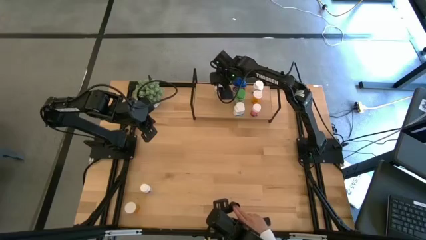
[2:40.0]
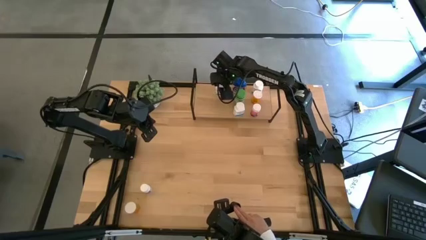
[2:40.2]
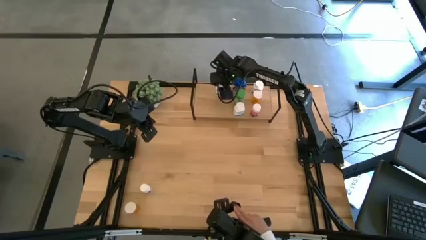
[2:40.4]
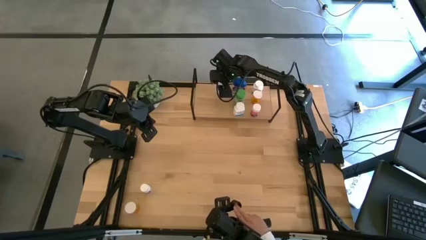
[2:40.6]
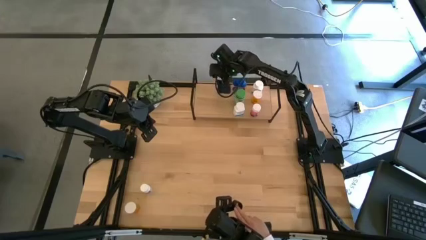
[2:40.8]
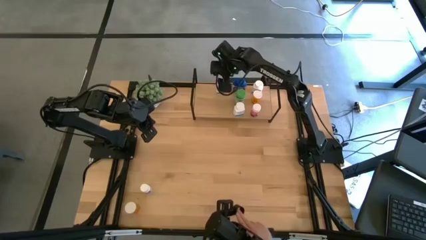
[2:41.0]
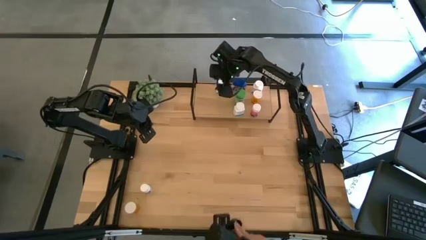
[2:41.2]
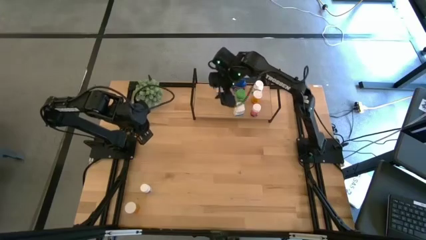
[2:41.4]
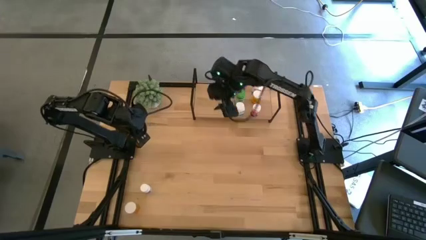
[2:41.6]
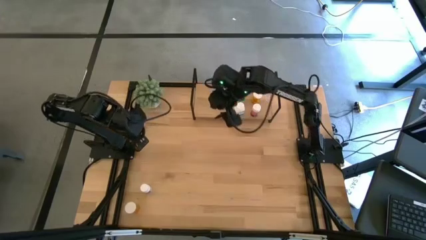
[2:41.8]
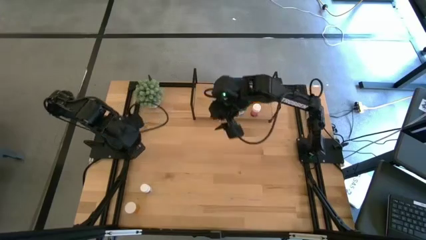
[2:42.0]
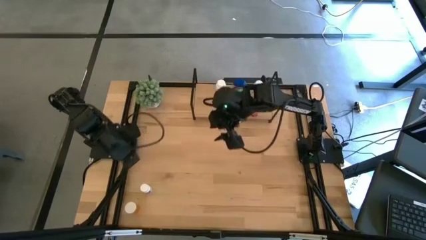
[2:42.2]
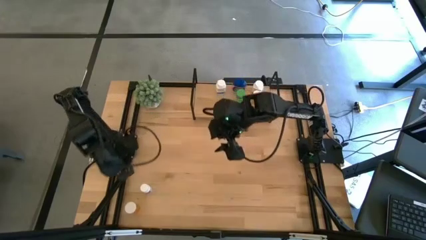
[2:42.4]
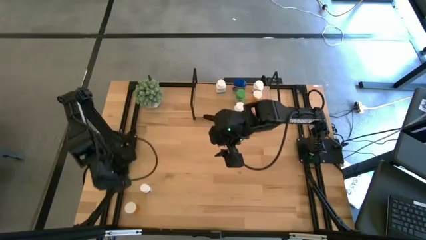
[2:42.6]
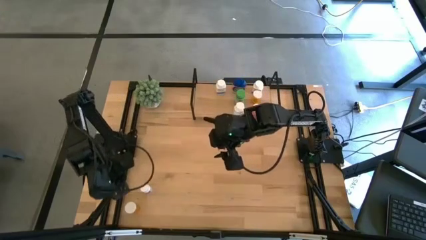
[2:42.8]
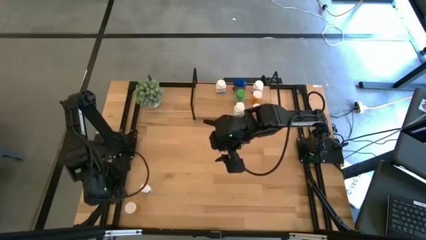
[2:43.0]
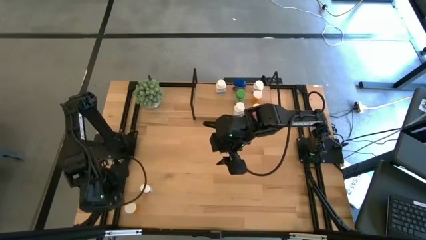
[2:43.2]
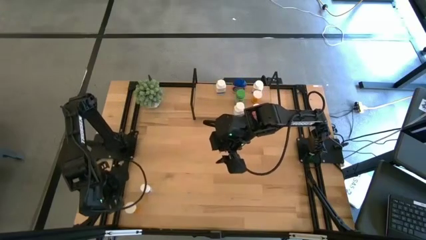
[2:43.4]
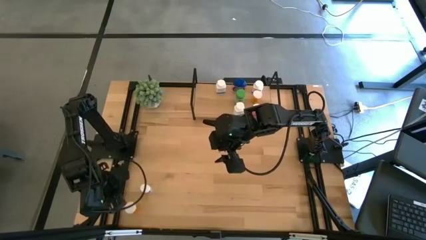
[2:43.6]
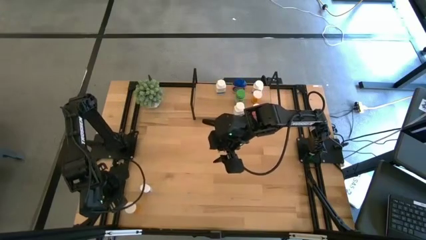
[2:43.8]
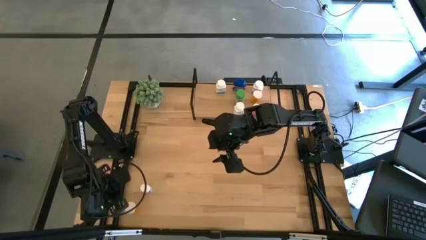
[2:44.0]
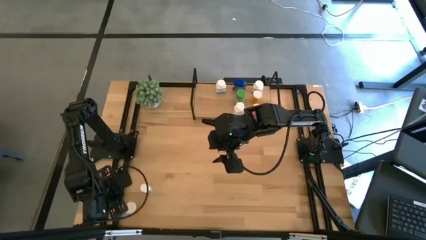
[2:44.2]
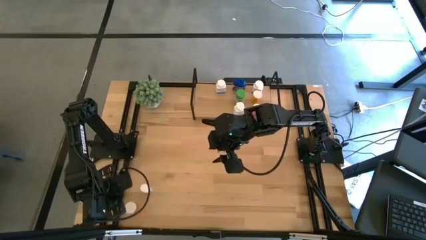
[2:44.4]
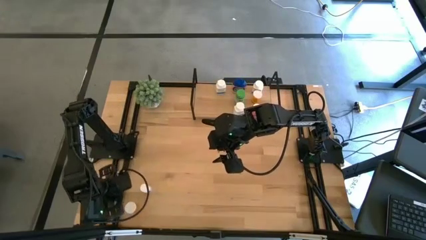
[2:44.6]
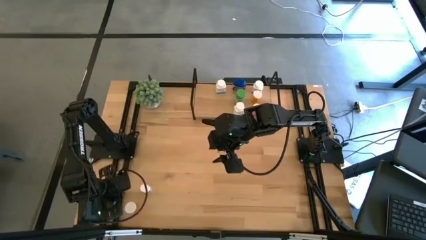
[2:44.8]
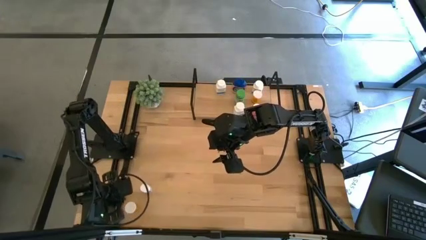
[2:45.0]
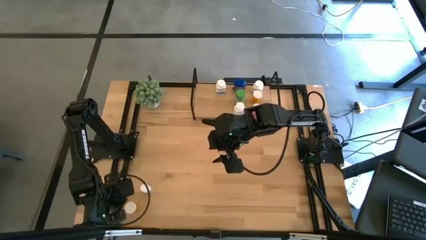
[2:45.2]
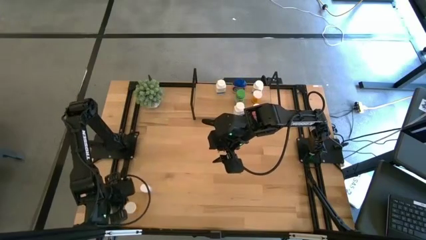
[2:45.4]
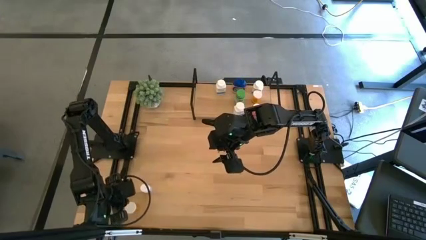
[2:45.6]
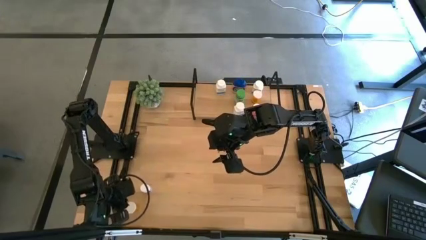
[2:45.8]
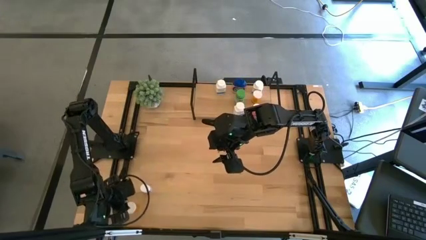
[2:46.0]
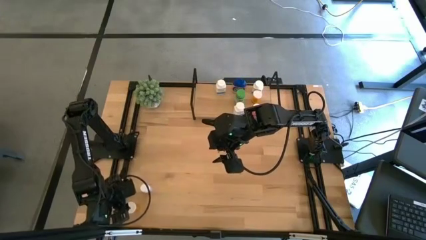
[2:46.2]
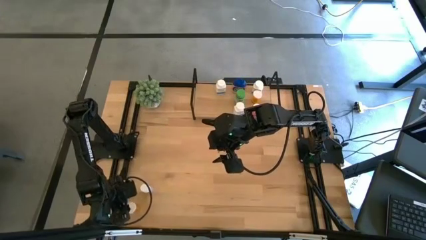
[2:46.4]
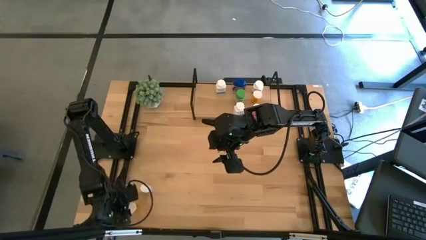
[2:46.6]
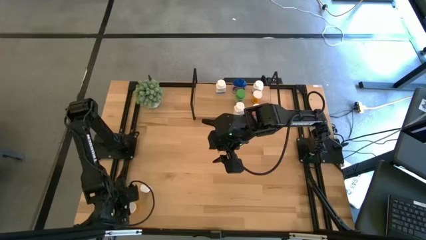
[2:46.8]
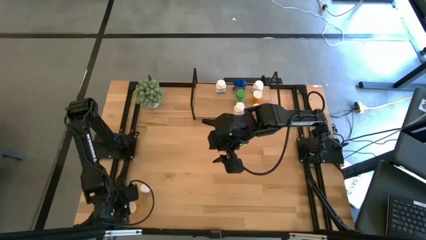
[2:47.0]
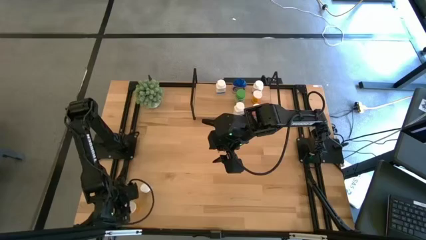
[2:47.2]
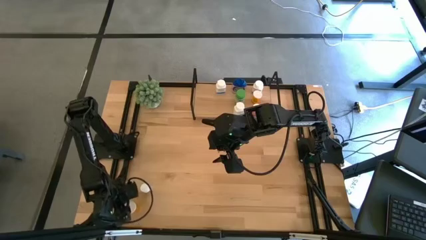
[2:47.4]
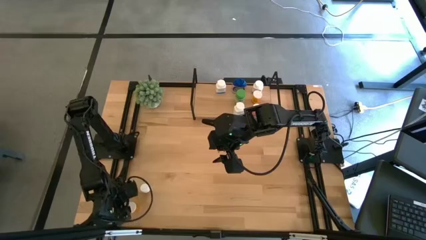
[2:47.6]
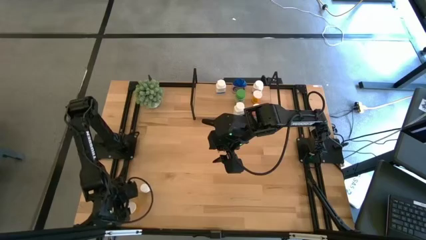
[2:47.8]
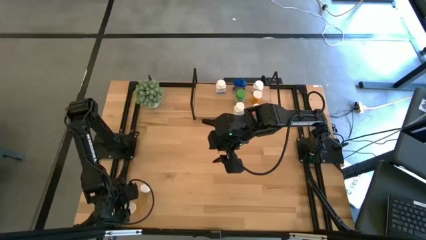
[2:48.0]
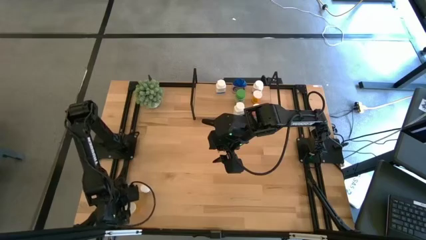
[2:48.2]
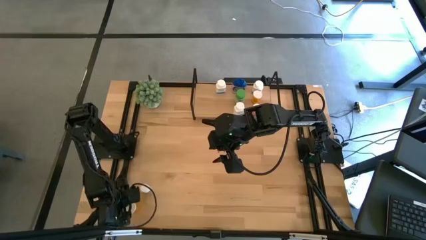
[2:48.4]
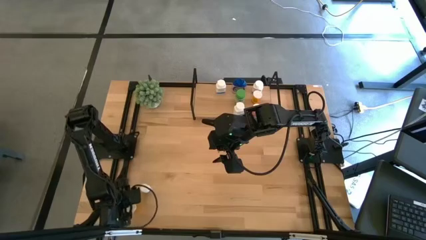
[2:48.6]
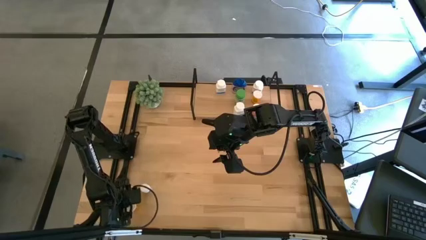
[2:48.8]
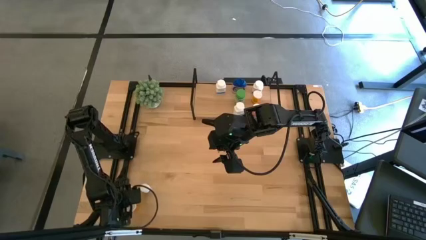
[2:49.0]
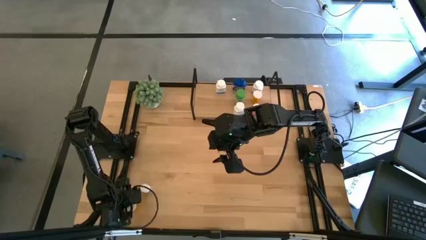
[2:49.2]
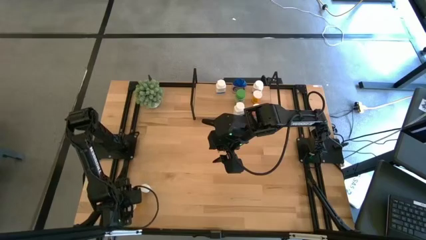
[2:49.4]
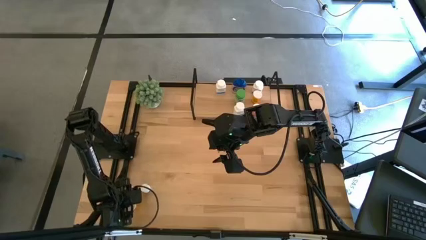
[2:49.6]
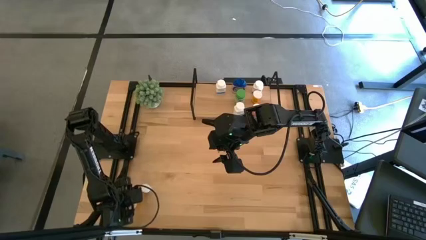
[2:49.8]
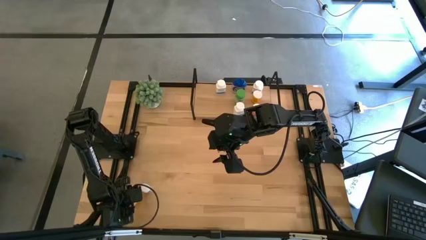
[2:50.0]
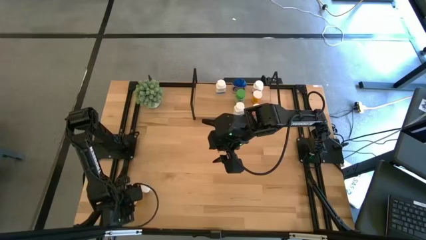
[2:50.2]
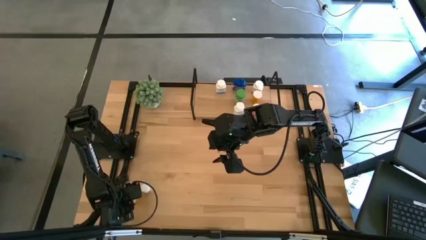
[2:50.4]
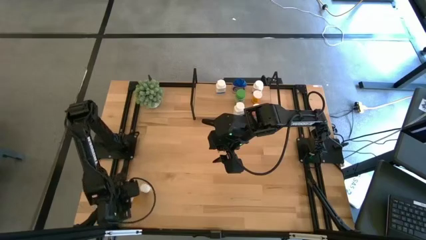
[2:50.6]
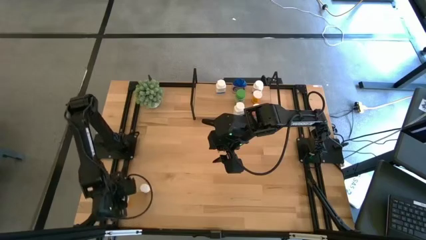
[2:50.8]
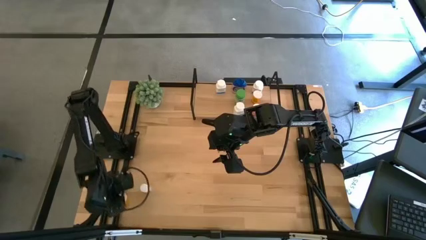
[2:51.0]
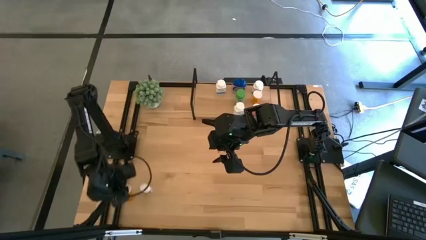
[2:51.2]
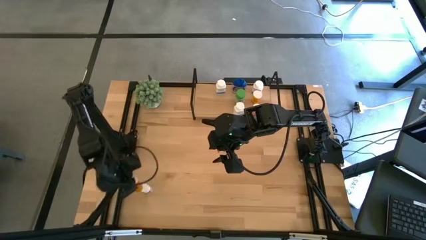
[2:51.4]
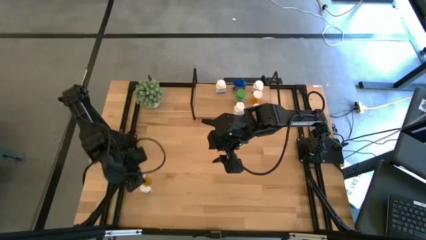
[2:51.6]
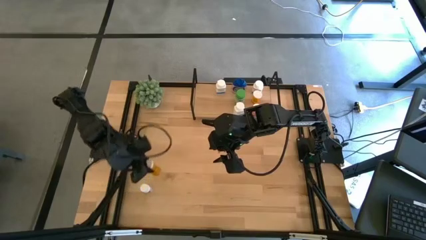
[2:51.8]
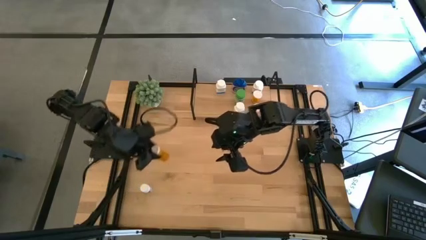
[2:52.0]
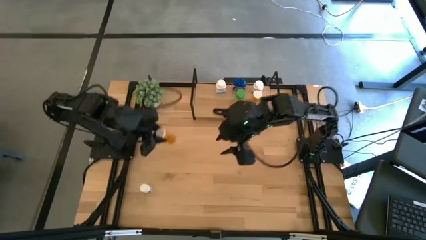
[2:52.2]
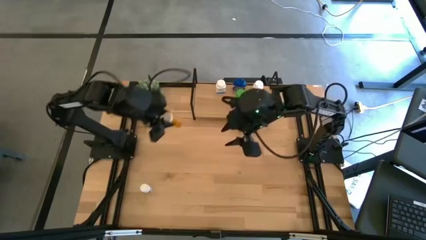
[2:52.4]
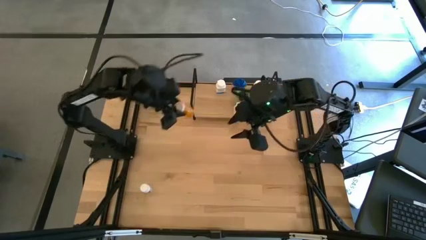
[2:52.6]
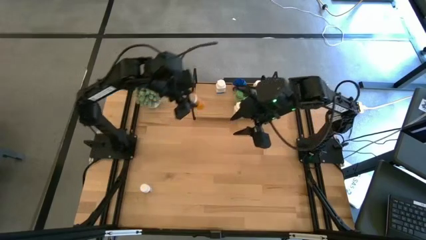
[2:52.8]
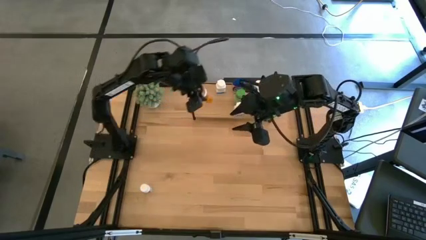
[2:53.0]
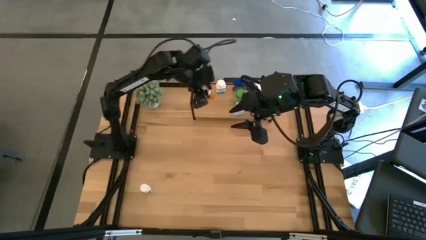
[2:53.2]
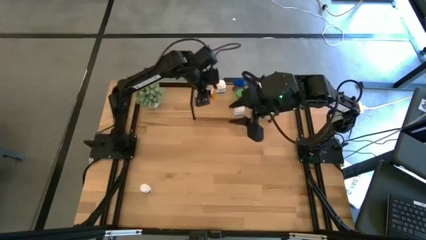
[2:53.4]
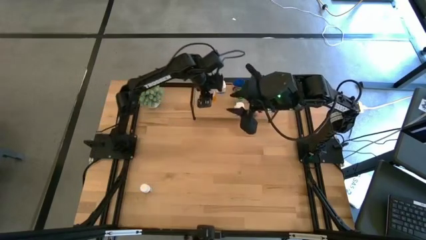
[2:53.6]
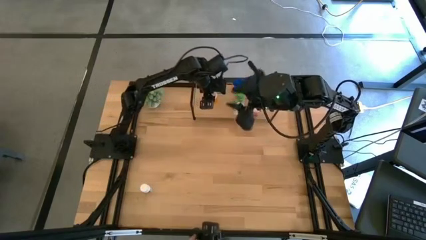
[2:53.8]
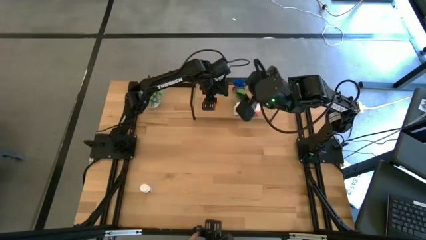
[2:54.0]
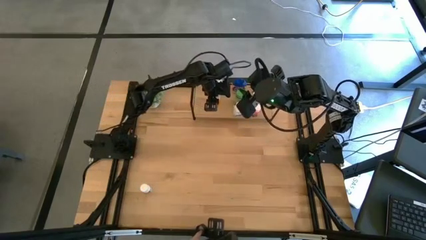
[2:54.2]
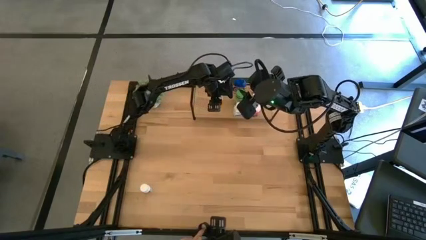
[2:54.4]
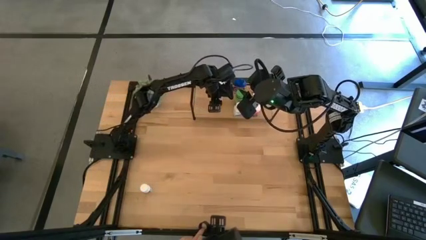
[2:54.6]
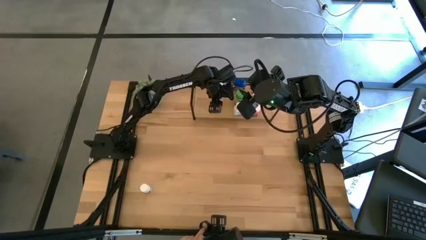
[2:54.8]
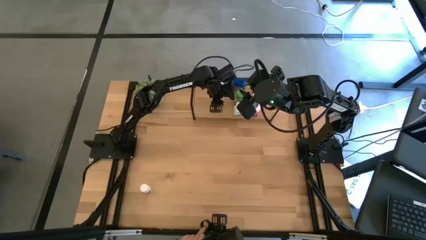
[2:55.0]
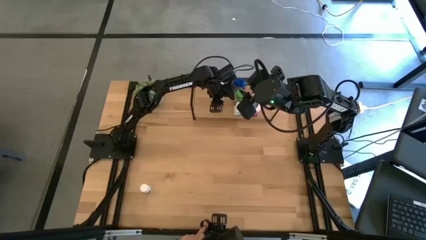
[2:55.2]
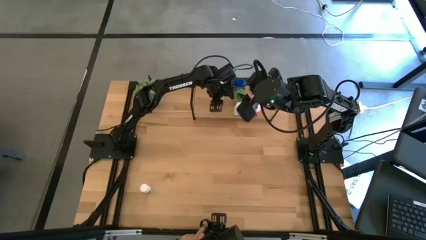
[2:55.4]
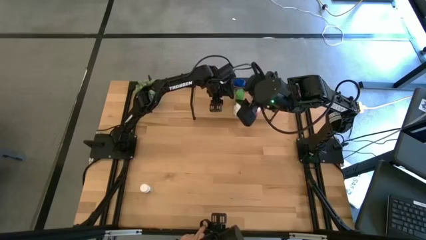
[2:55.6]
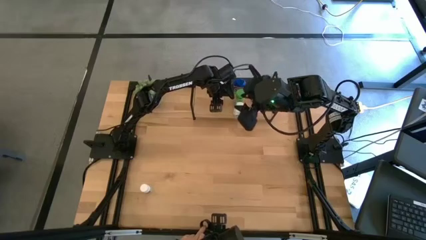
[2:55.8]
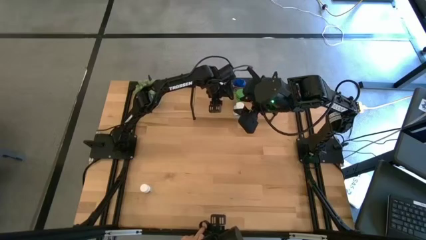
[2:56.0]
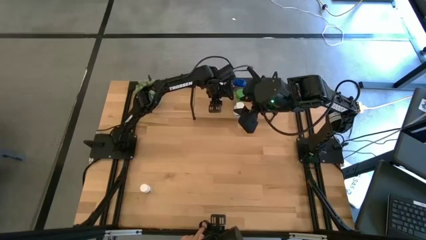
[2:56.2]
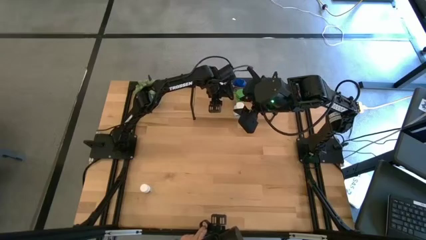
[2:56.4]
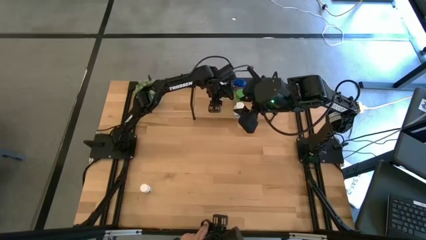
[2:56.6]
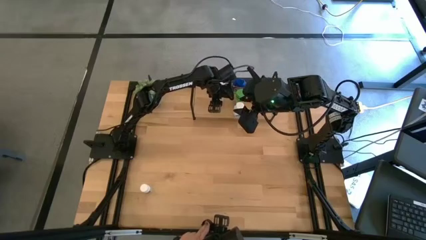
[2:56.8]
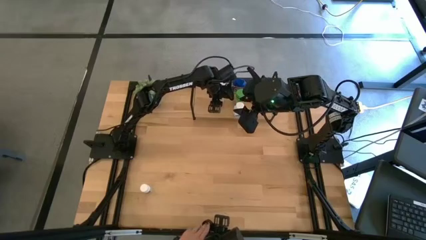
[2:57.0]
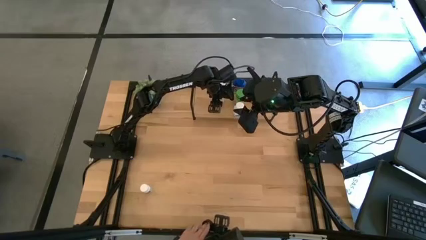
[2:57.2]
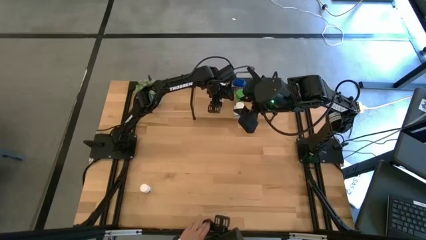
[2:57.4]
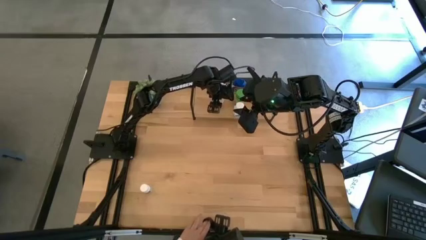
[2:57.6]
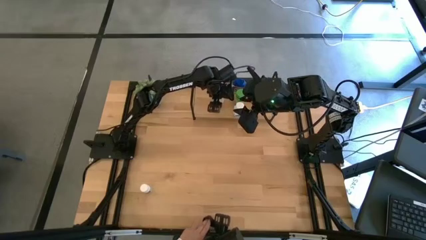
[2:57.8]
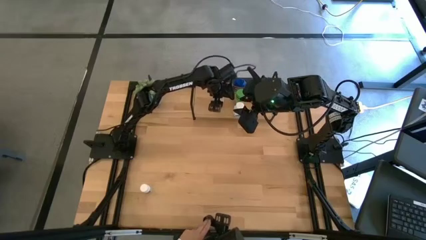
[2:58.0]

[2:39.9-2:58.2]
Task: Pick and place medicine bottles onto shelf by color
Put the orange pill bottle on the shelf
